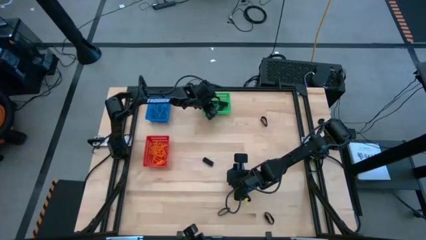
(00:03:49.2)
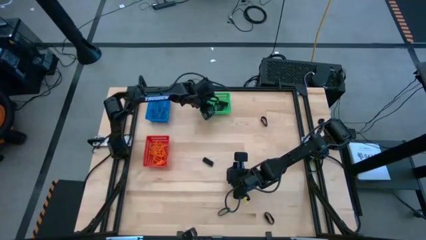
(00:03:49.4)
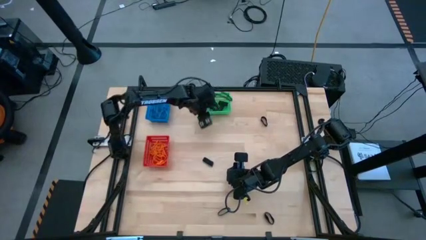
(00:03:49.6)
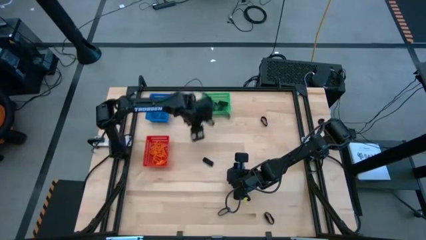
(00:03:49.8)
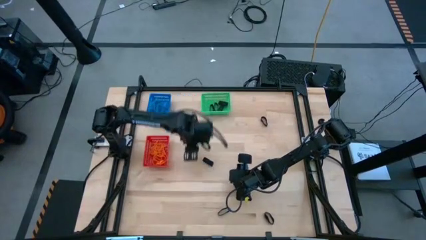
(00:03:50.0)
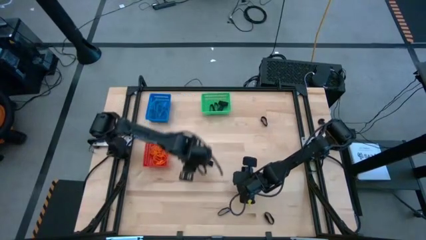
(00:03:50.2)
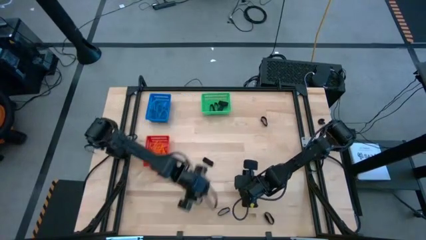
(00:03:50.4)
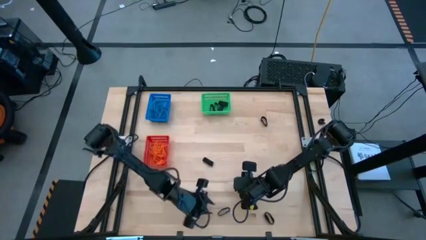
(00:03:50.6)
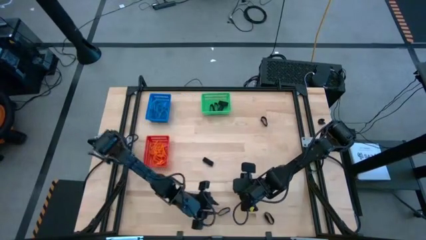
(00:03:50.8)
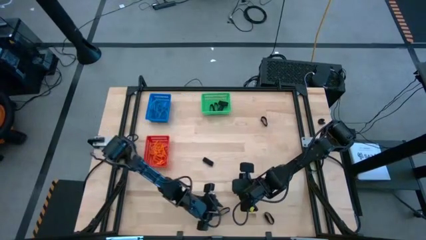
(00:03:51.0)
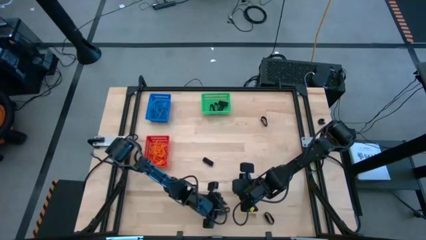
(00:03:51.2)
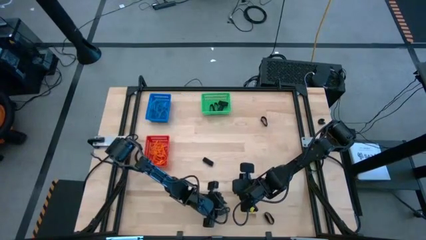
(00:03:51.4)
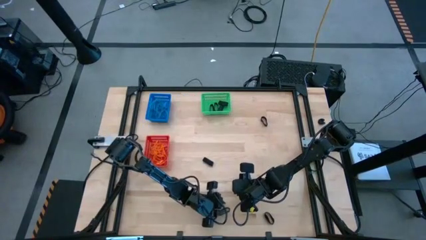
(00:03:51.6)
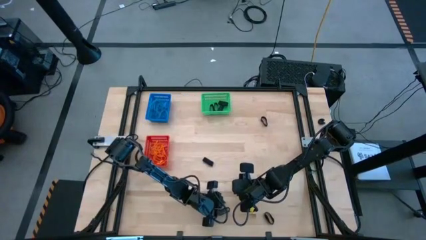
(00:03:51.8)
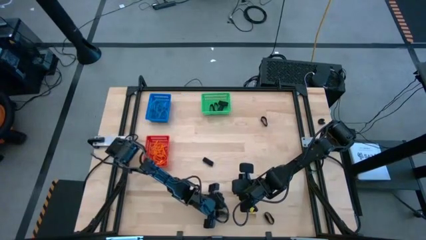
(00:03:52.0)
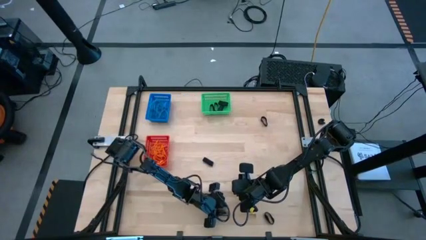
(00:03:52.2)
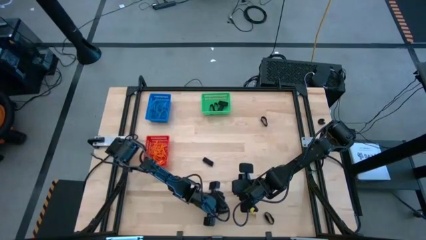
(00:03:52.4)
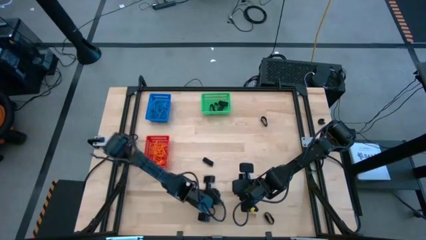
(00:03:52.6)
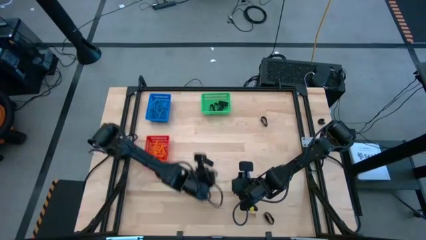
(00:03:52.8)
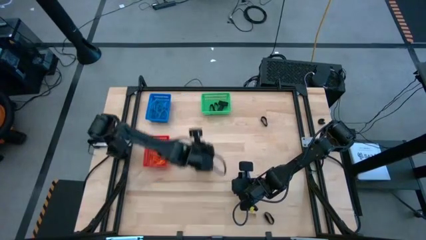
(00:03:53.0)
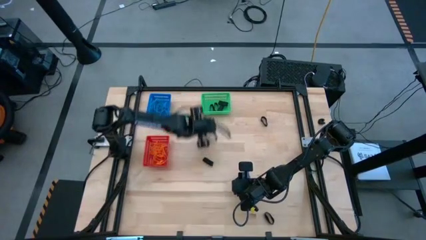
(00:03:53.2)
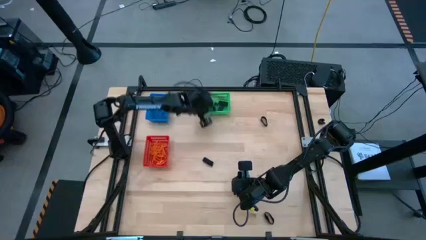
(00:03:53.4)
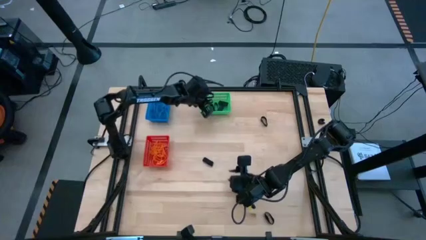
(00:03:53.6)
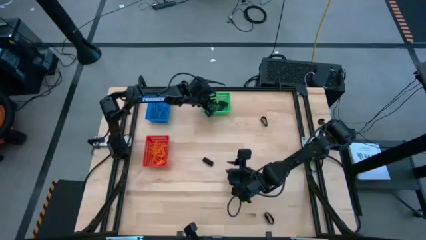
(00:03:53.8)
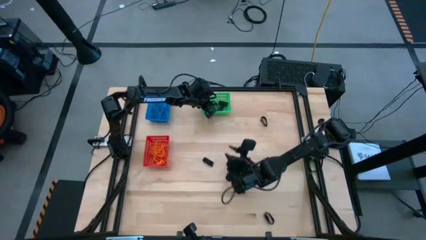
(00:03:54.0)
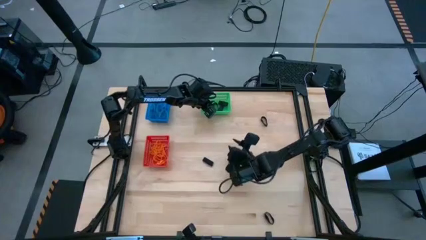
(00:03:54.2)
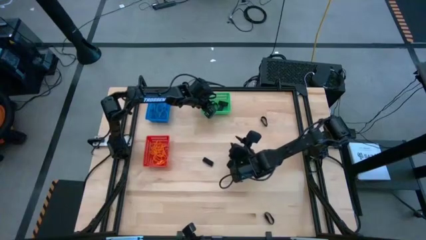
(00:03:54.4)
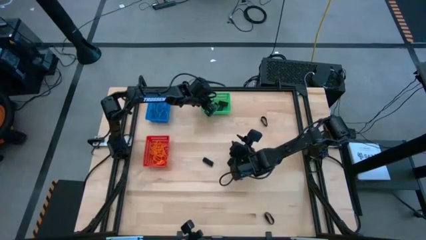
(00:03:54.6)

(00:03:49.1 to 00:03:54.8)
Task: Sort rubber bands into baskets
Put the black rubber band into the green bin

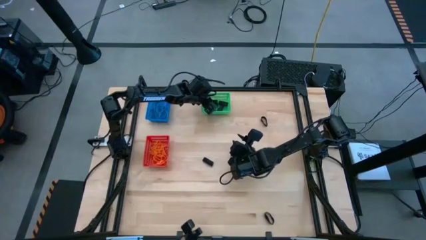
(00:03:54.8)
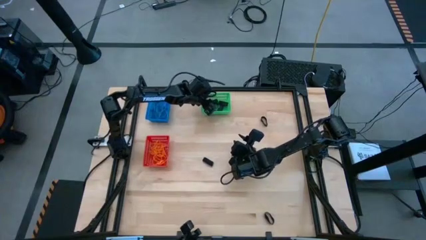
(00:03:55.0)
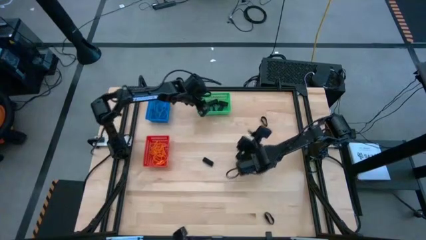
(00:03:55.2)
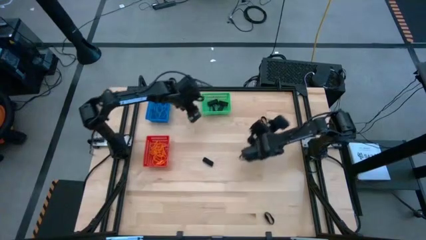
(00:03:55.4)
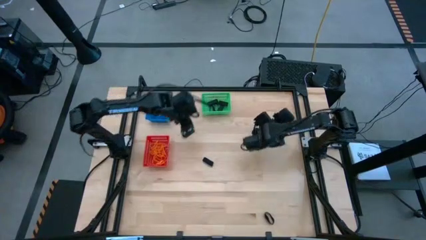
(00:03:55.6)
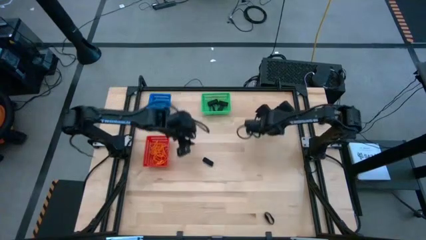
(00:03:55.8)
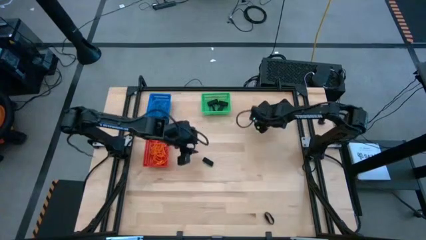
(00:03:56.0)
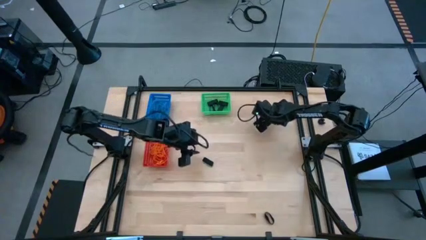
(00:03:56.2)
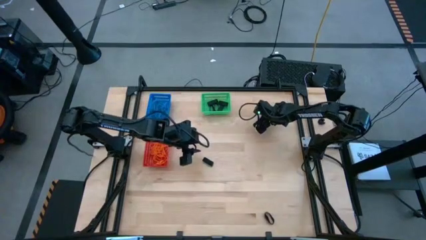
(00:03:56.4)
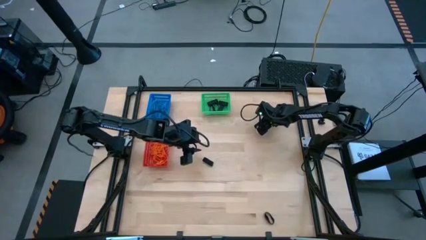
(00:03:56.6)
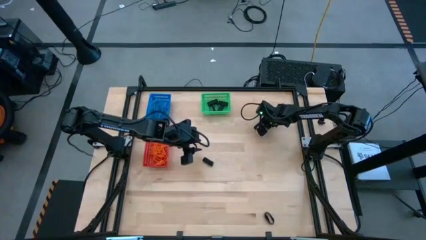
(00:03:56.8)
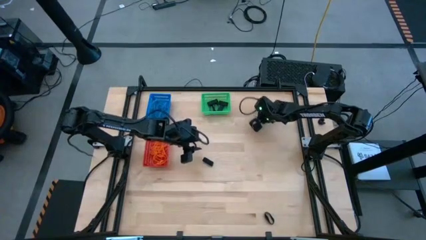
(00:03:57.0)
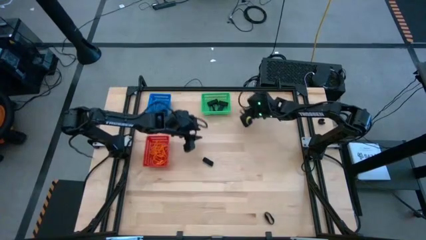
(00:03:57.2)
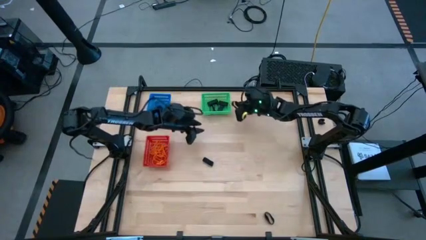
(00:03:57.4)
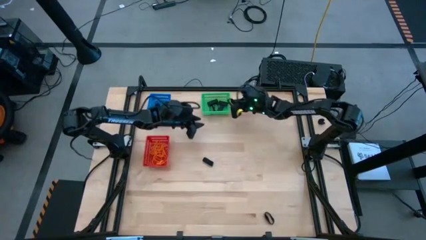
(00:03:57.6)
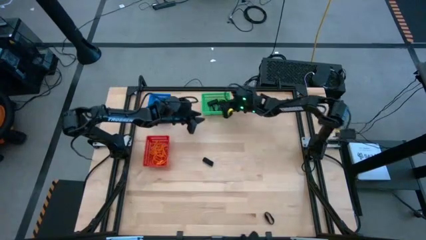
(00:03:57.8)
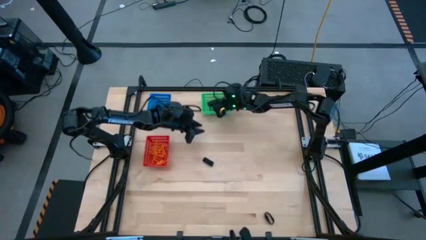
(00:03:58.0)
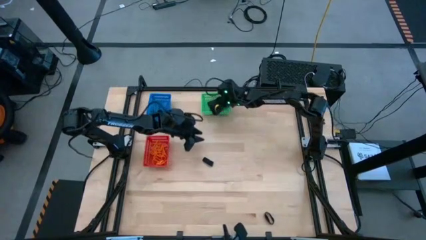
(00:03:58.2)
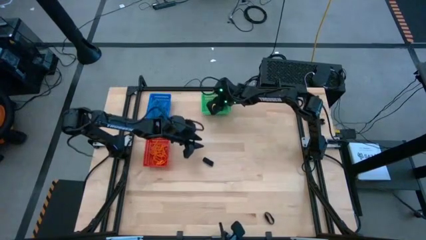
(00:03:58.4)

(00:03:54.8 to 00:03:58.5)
Put the black rubber band into the green bin

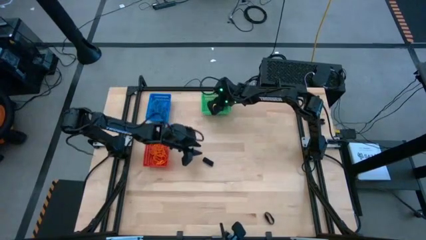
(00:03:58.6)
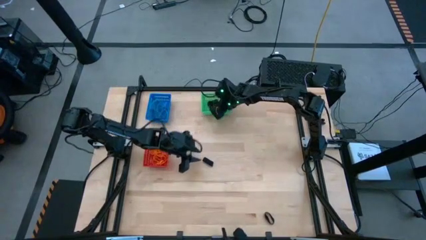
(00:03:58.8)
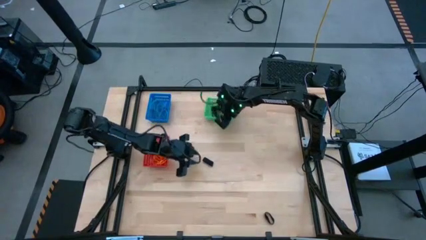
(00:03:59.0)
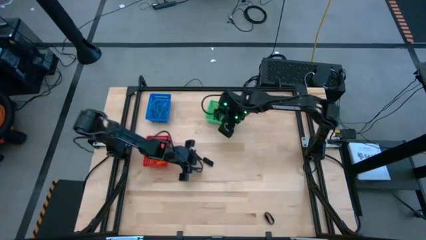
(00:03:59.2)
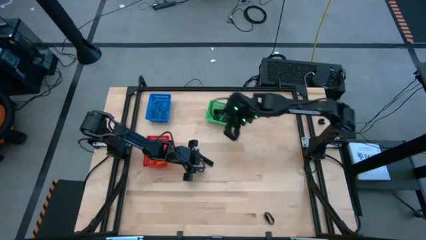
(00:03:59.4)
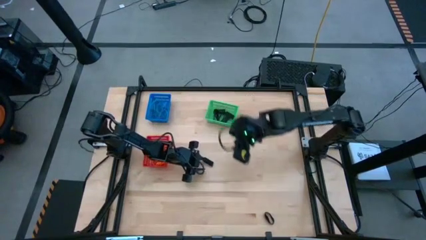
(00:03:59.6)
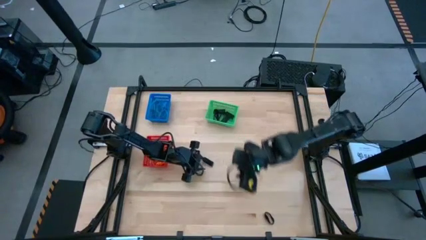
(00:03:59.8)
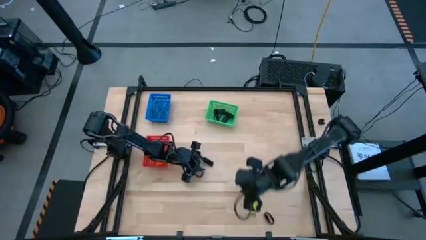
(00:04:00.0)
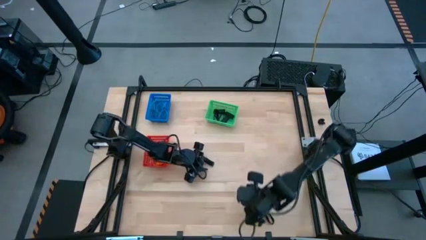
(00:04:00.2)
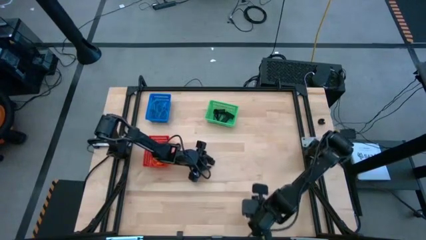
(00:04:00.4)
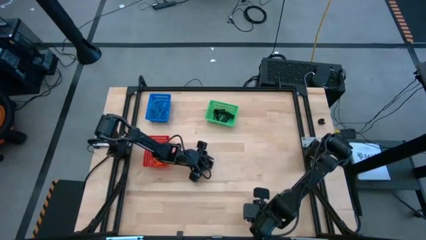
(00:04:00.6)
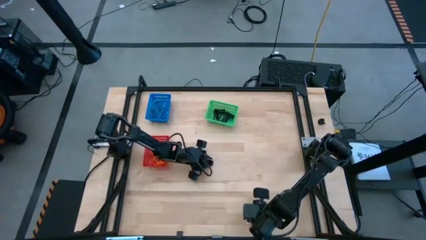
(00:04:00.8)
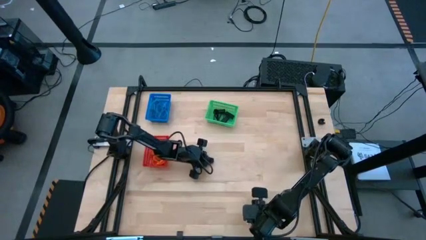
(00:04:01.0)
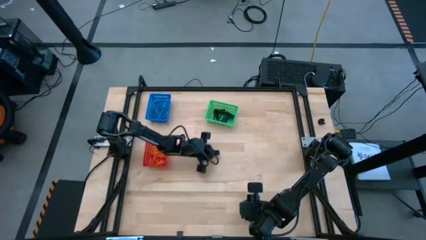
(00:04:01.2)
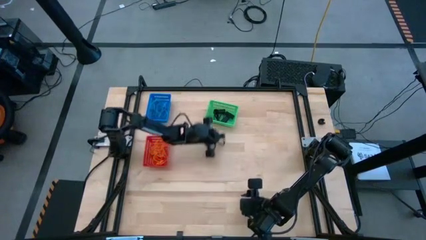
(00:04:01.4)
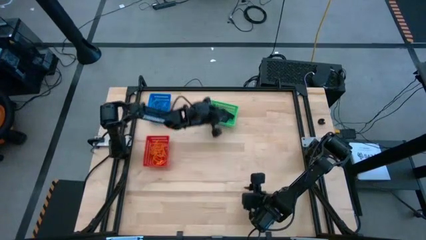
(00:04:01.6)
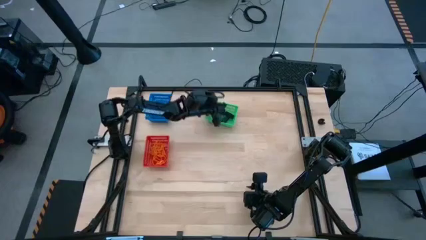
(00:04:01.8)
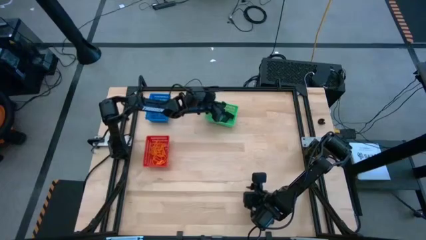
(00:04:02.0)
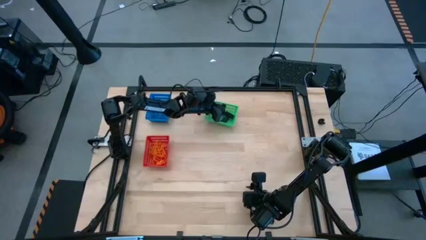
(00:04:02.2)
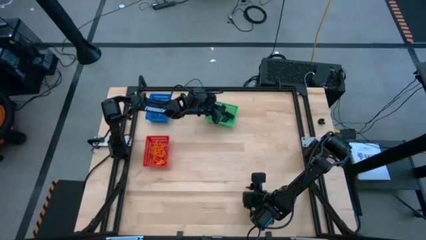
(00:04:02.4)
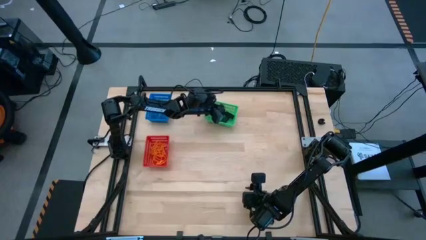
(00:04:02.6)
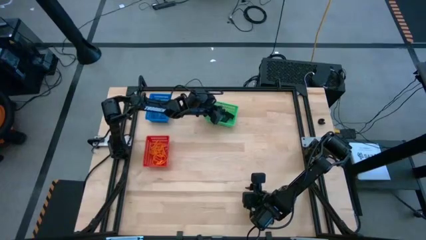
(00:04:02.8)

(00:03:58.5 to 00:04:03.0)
Put the black rubber band into the green bin

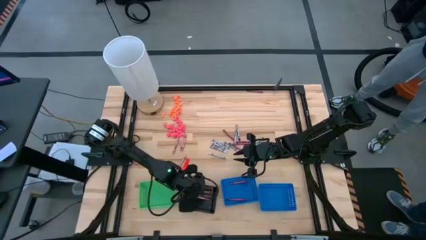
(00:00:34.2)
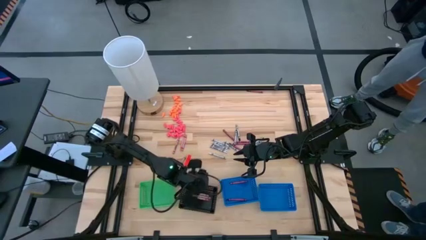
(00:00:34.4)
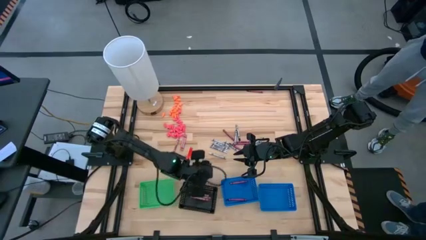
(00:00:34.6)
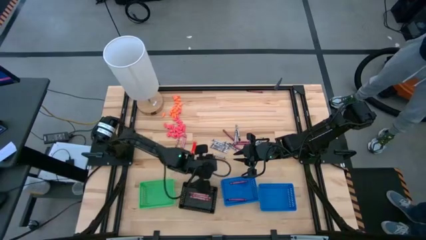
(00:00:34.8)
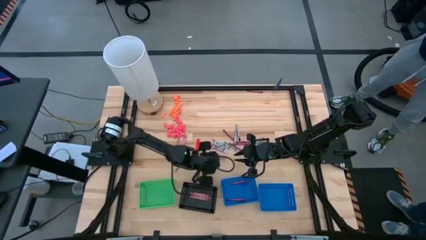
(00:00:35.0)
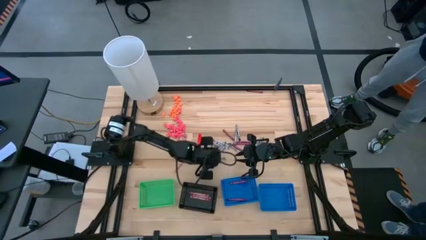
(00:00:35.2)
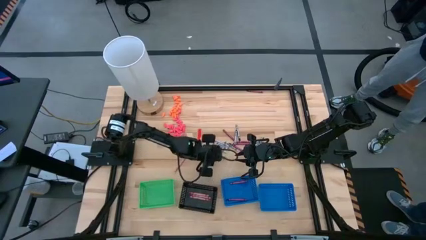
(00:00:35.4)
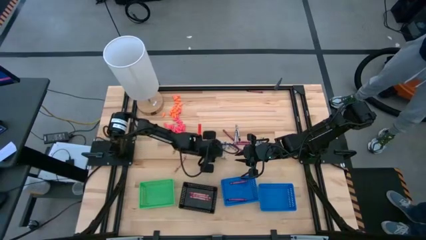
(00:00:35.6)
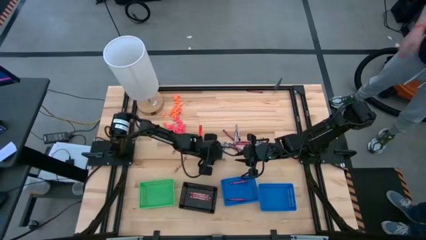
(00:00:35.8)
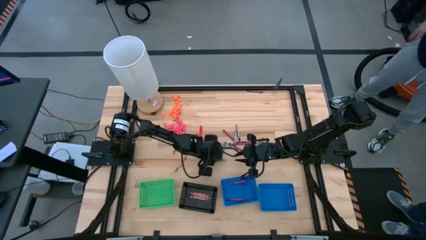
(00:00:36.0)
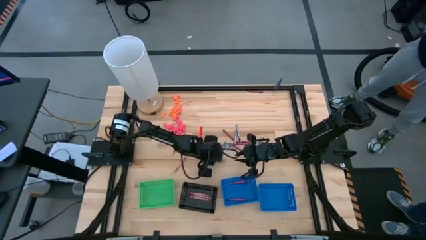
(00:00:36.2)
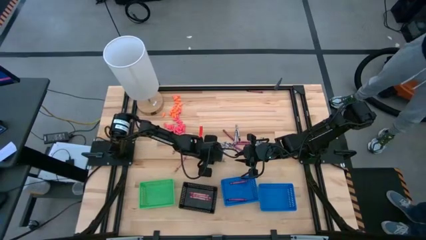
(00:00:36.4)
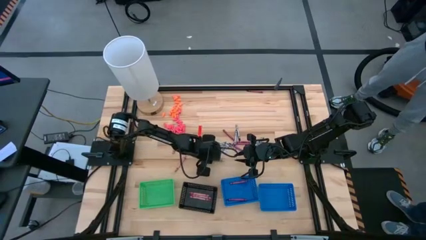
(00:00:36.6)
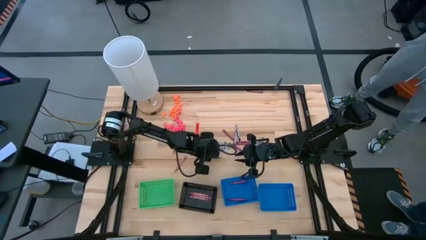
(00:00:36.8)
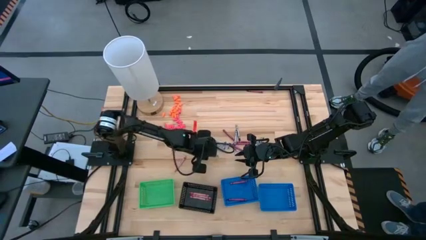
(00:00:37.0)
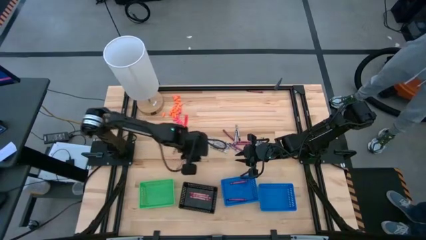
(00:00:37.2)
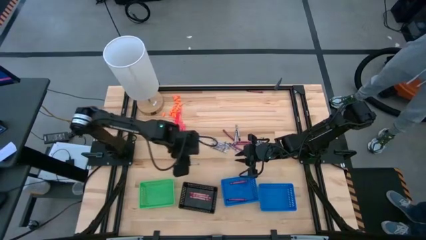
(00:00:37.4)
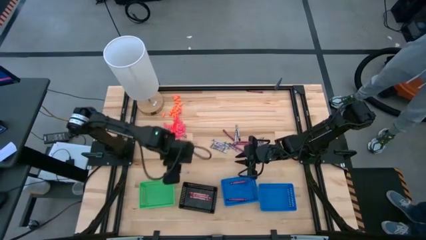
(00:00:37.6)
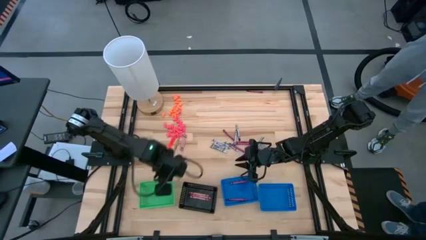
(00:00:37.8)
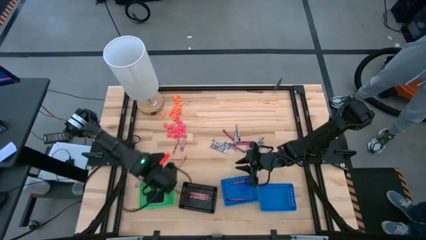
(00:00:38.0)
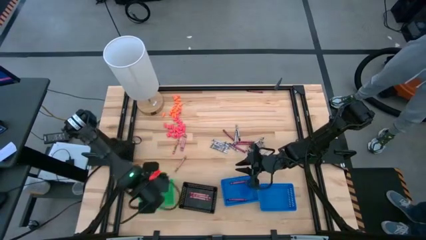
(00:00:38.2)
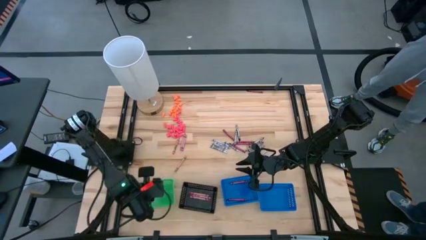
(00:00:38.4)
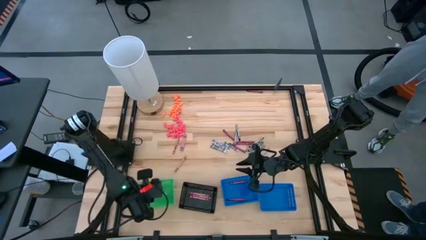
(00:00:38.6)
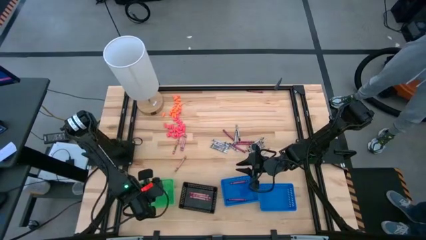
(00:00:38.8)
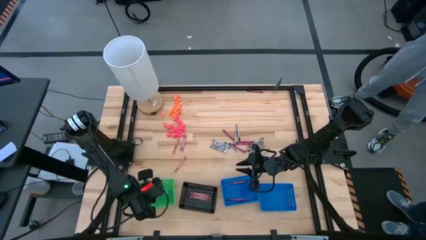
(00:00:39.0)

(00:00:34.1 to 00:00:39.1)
Task: Sort crayons
Put the white crayon into the green bin
